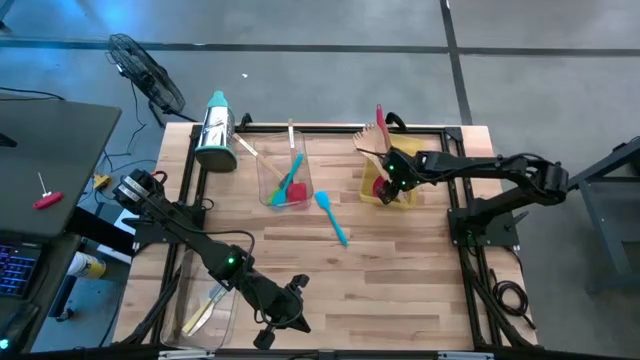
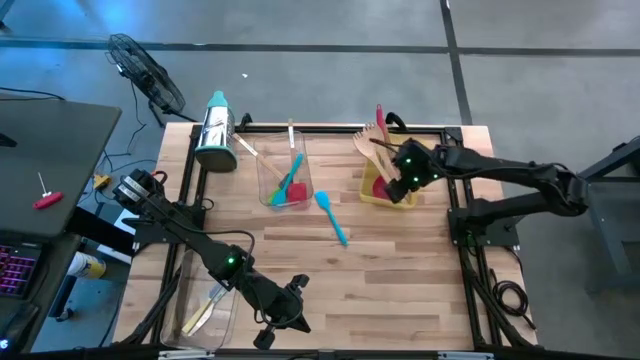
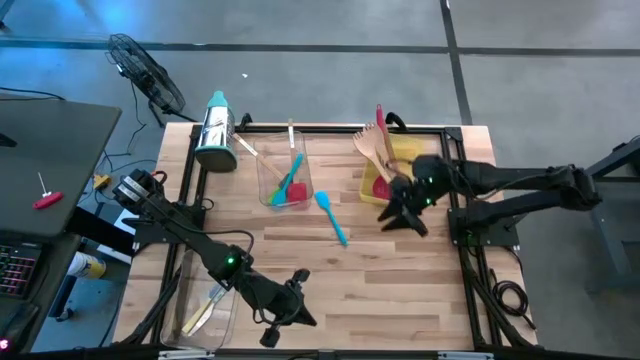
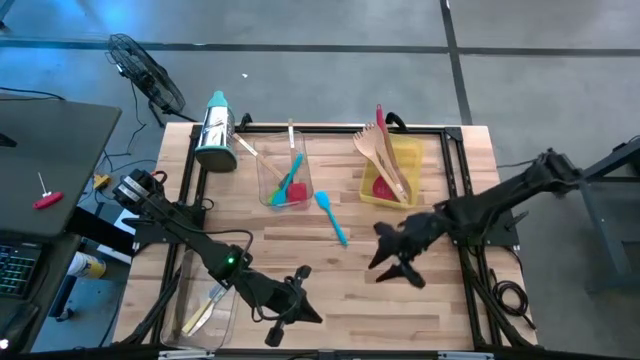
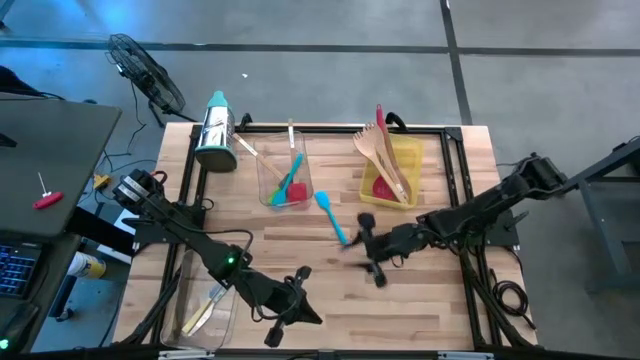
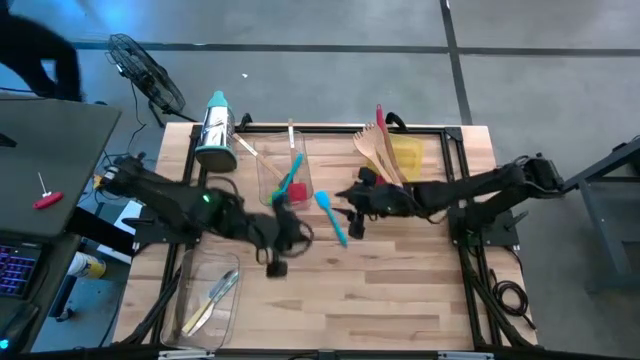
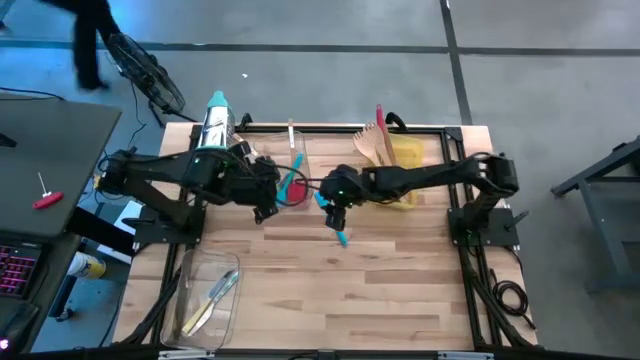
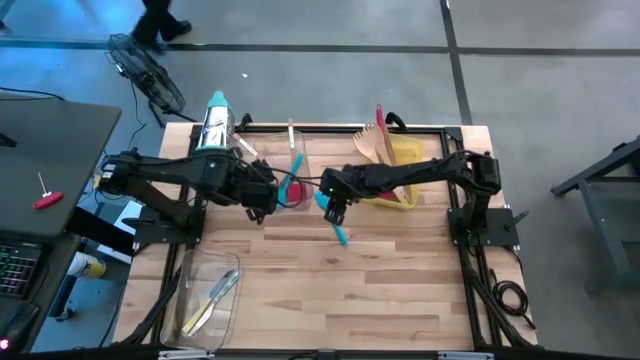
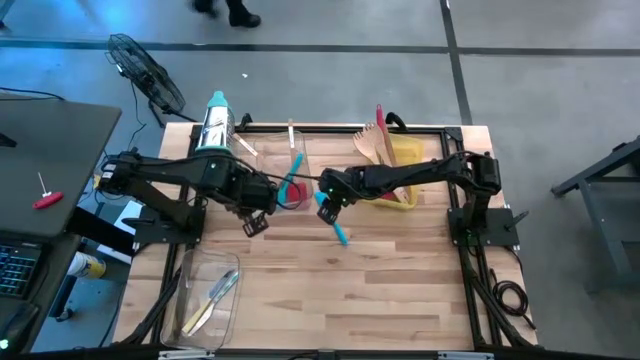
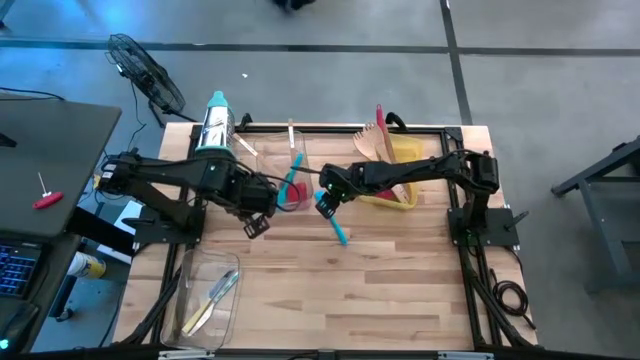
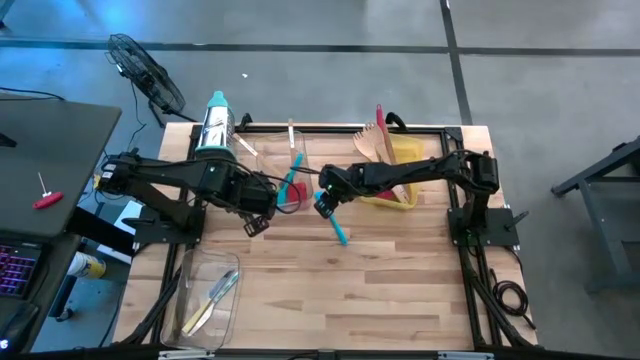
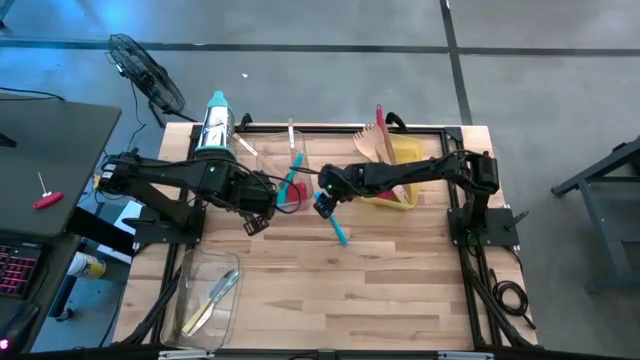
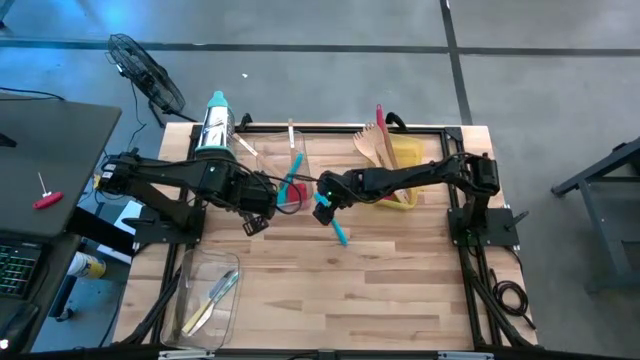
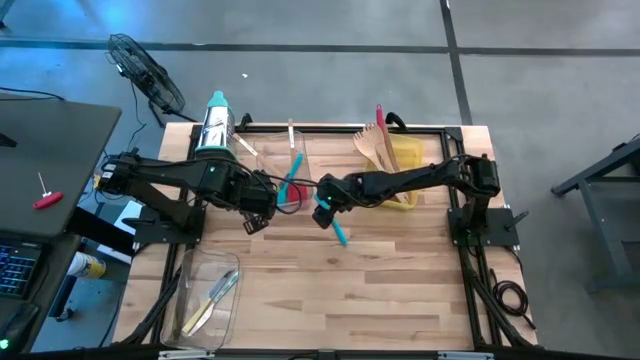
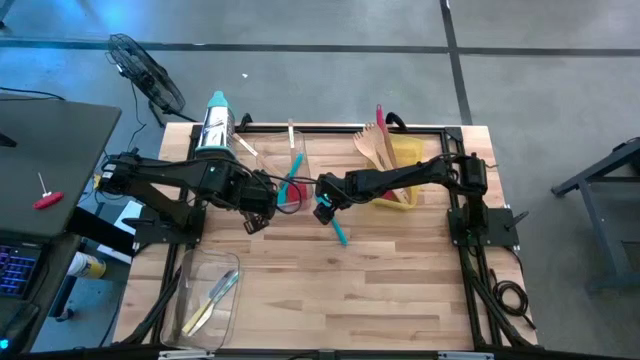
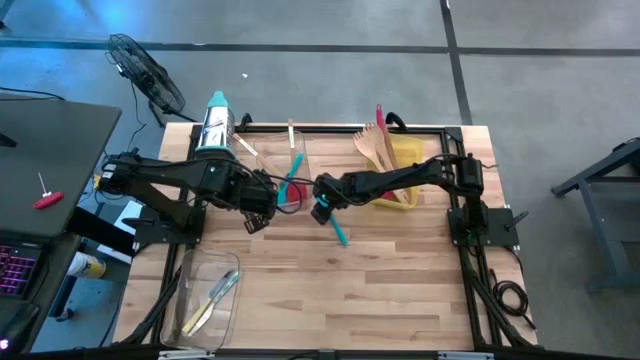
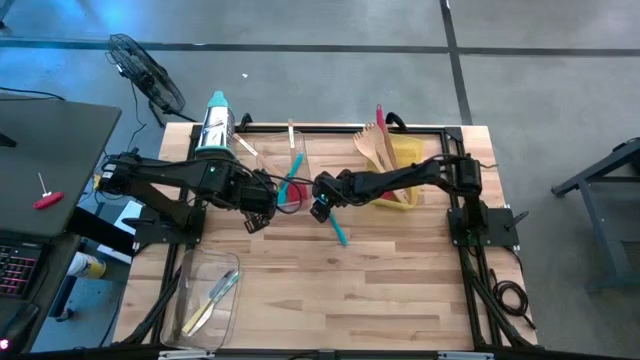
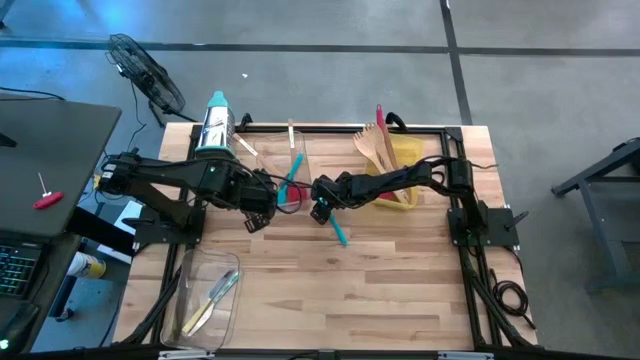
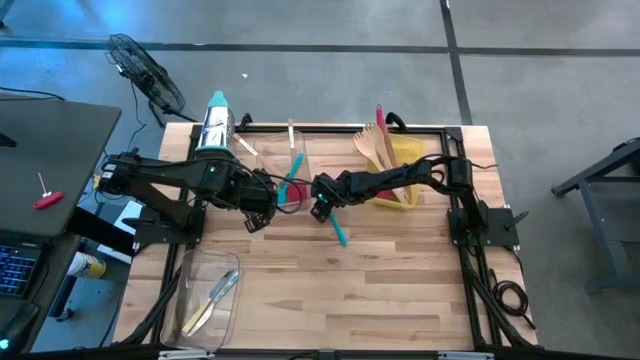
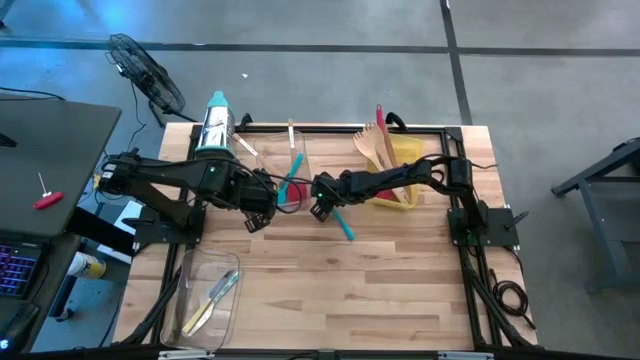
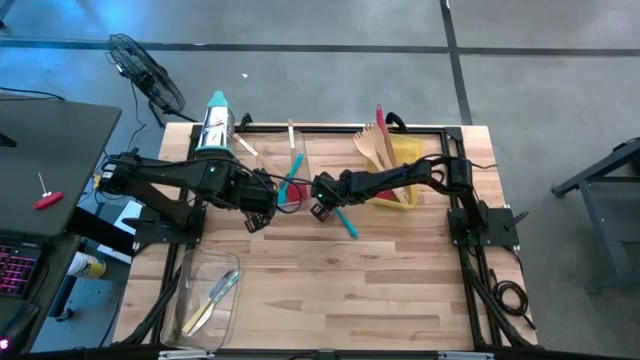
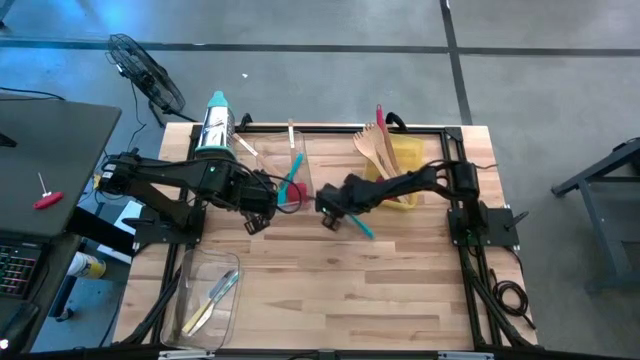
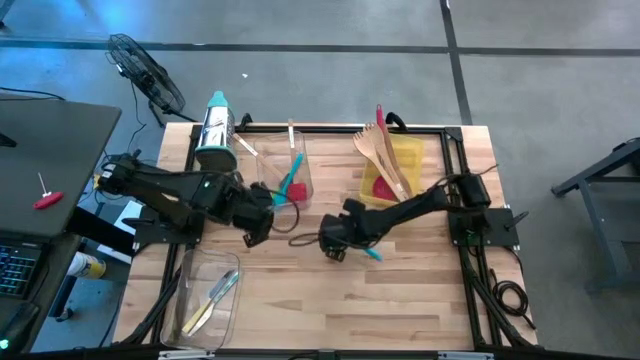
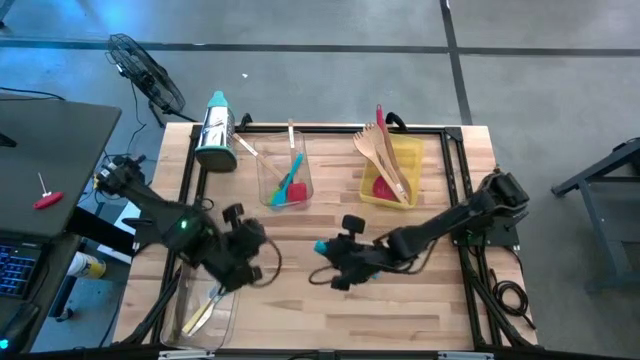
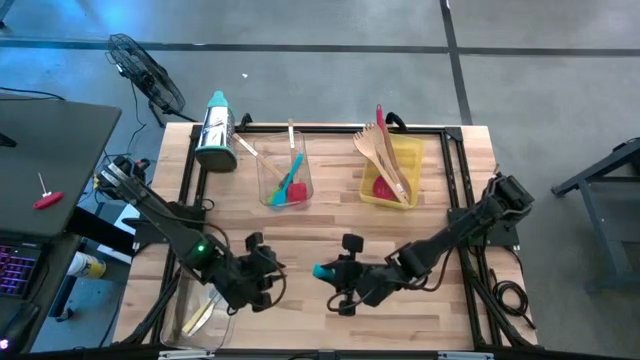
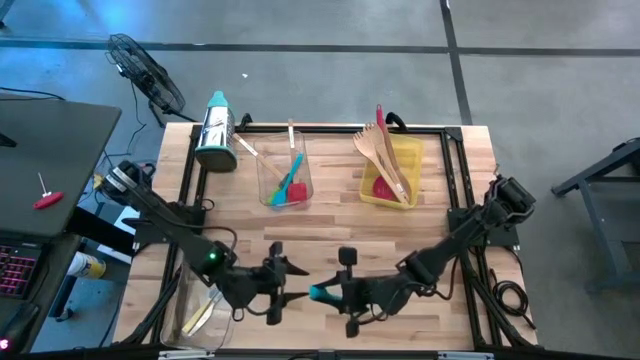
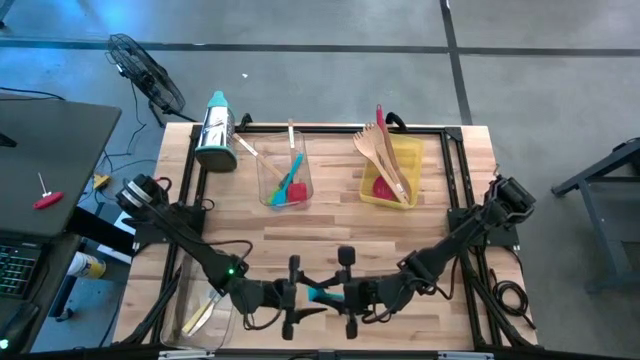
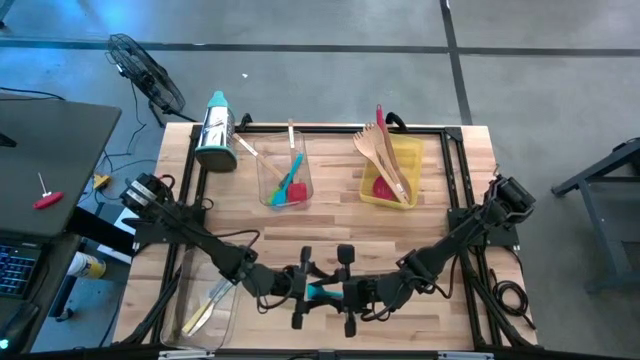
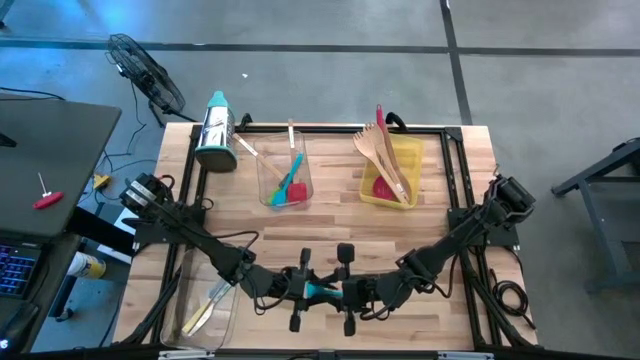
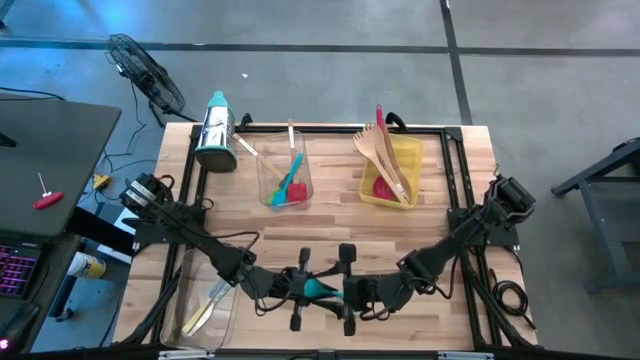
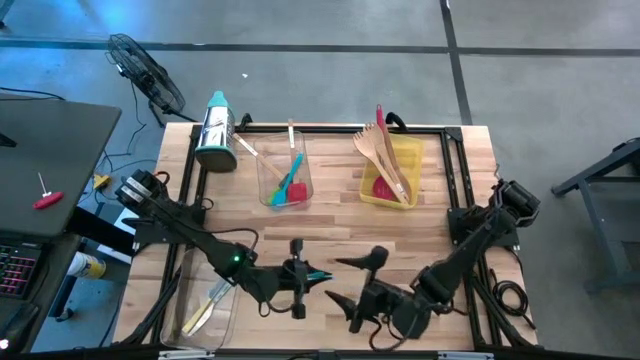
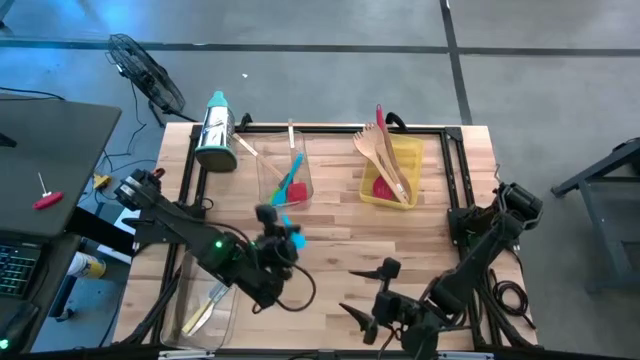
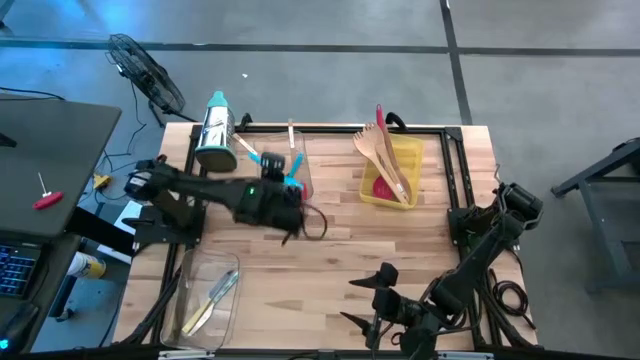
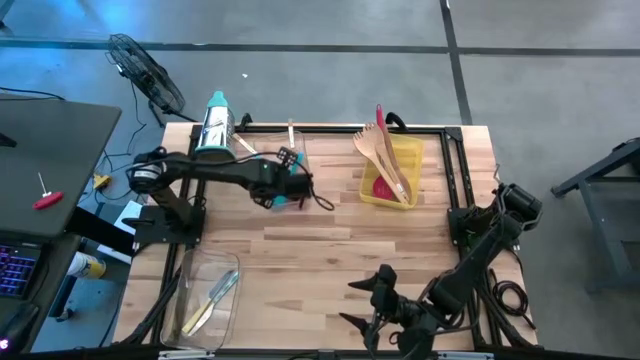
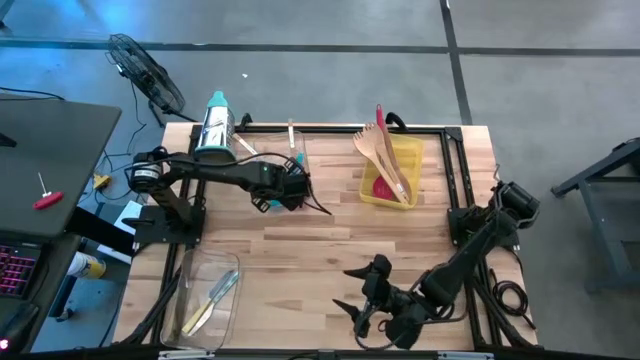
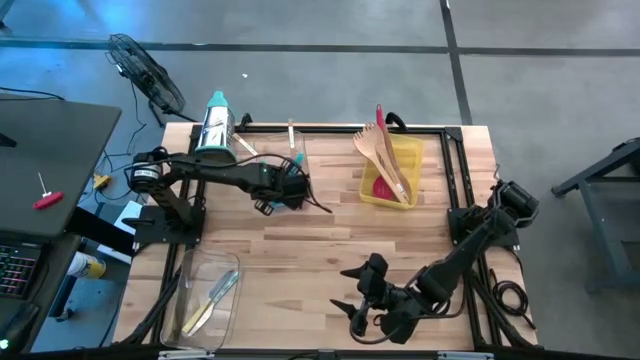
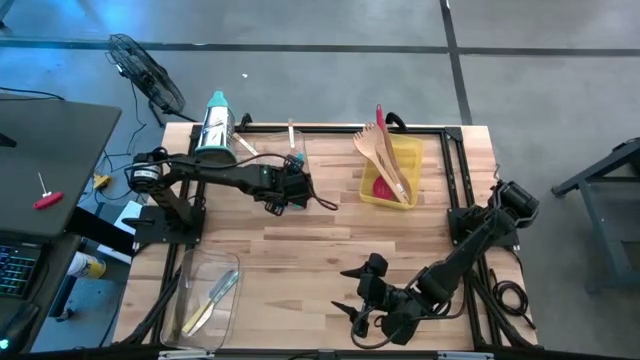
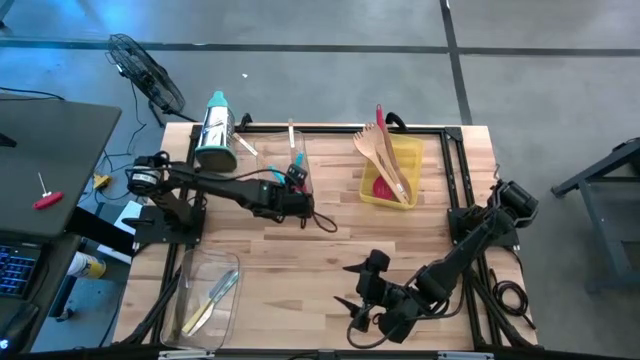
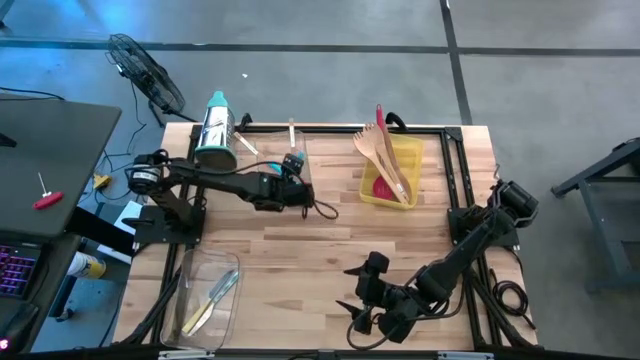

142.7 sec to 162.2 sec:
Task: Pick & Place Kitchen Items
Put the blue spatula into the top transparent bin
